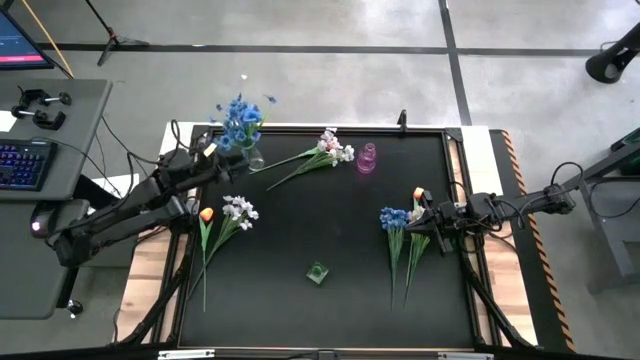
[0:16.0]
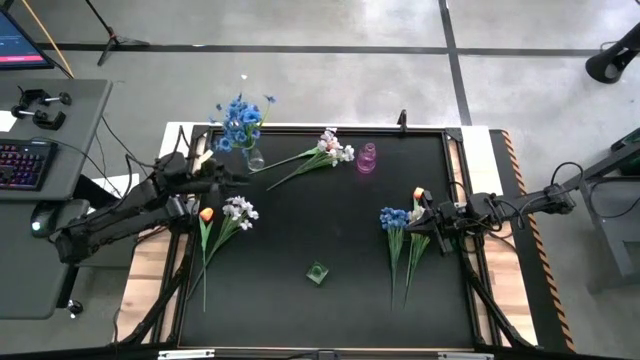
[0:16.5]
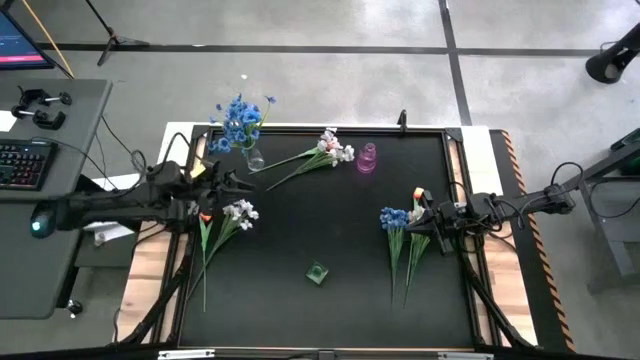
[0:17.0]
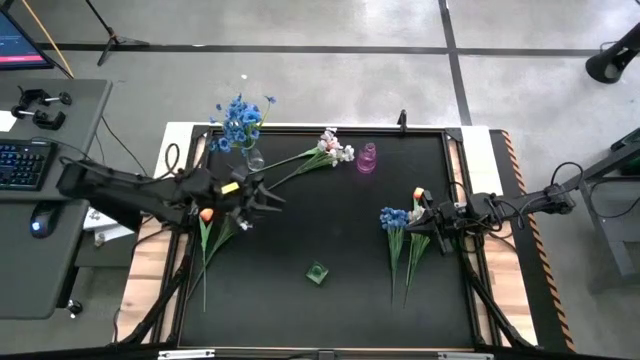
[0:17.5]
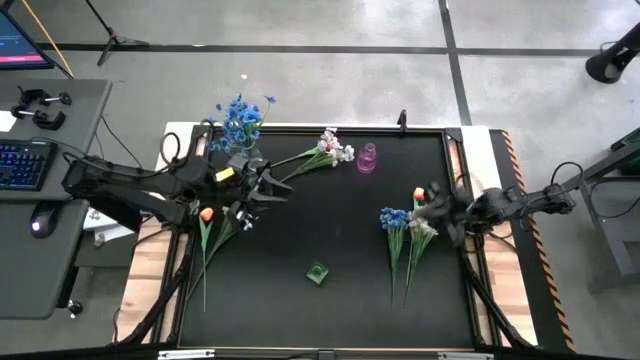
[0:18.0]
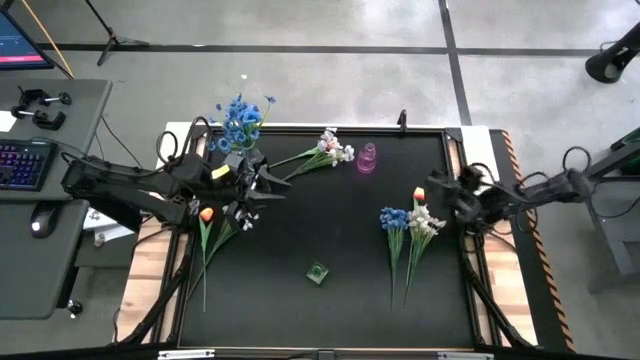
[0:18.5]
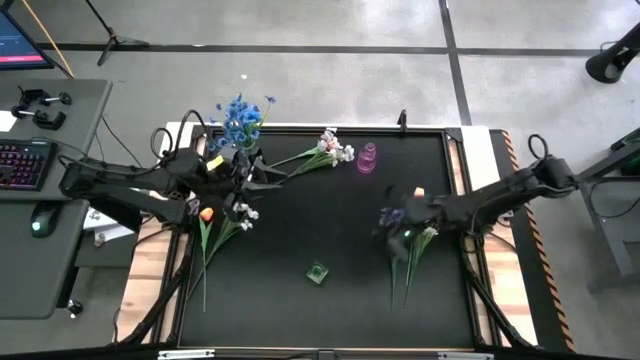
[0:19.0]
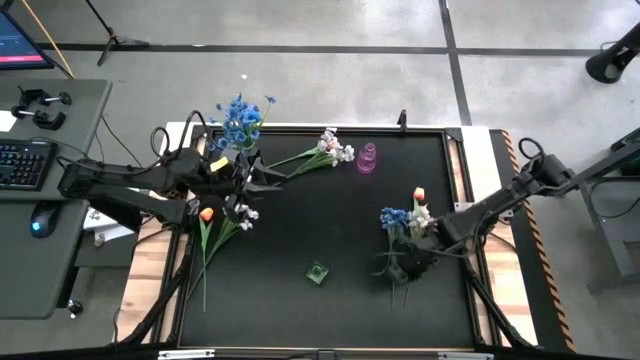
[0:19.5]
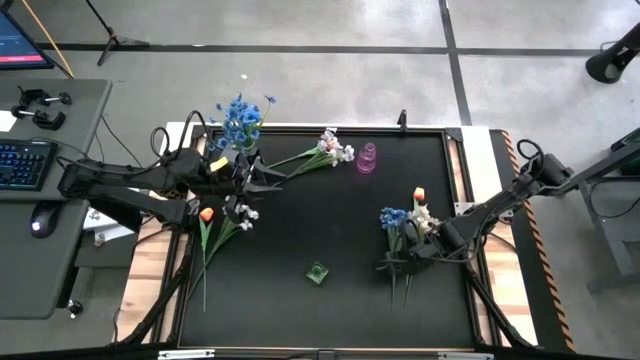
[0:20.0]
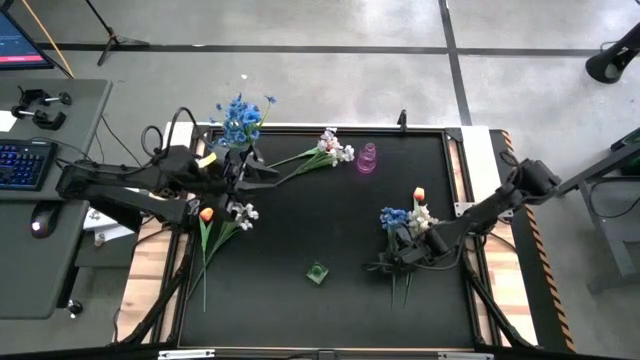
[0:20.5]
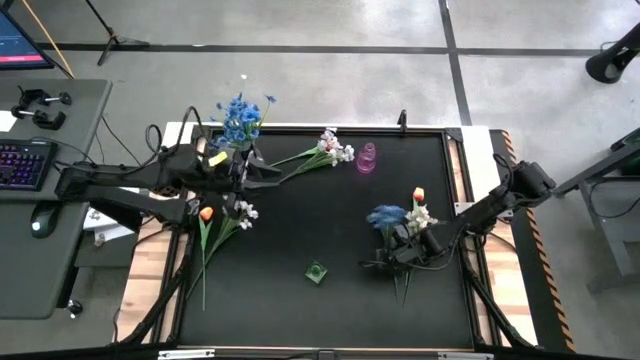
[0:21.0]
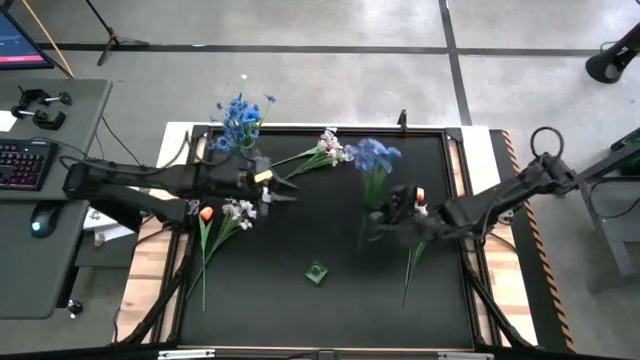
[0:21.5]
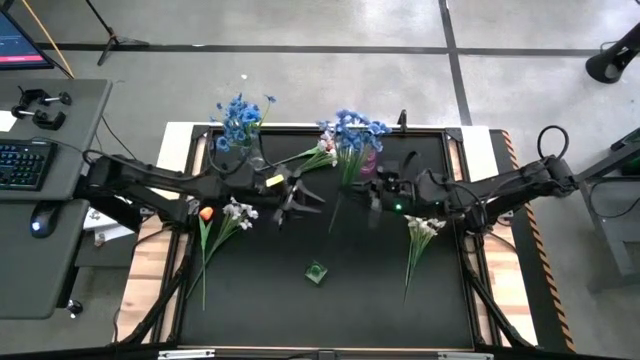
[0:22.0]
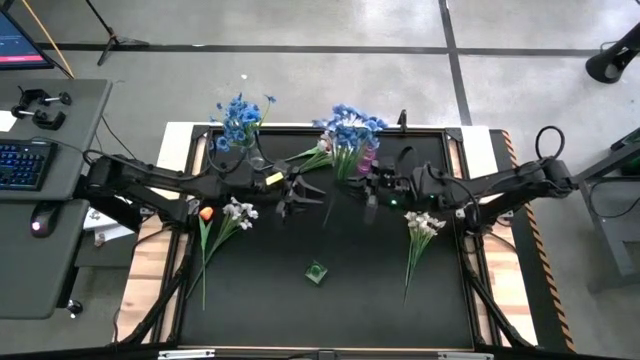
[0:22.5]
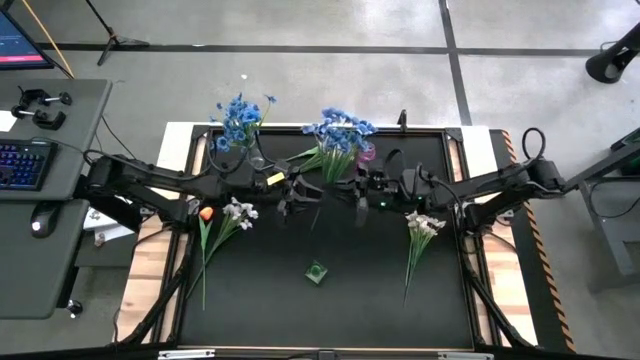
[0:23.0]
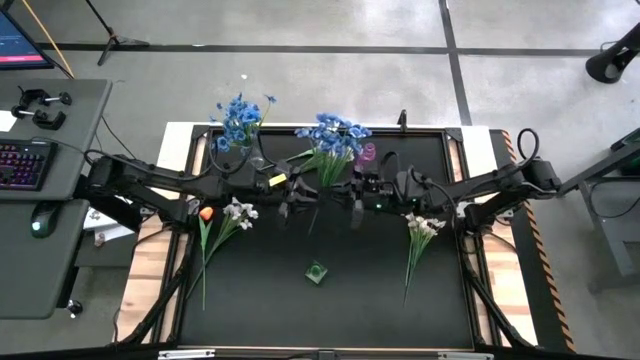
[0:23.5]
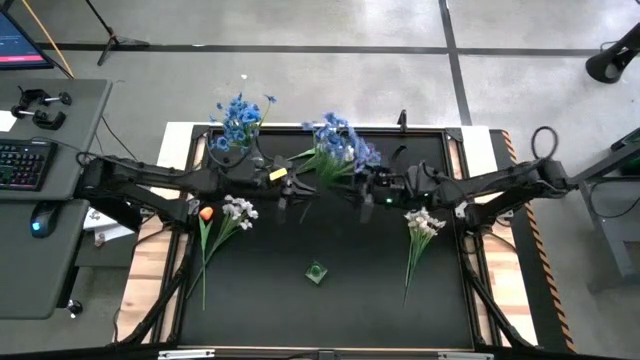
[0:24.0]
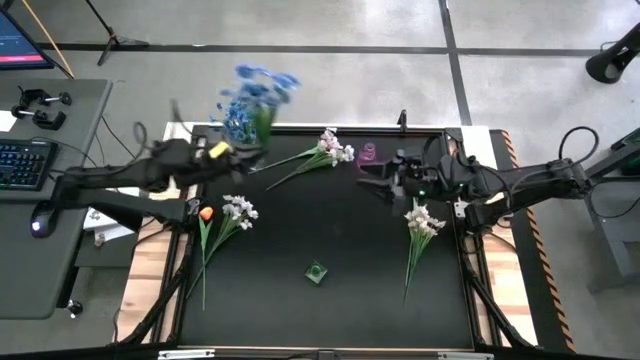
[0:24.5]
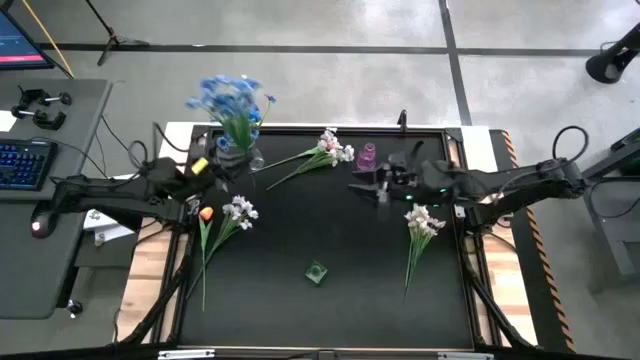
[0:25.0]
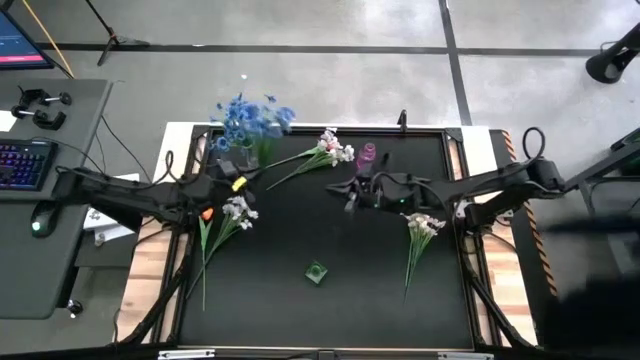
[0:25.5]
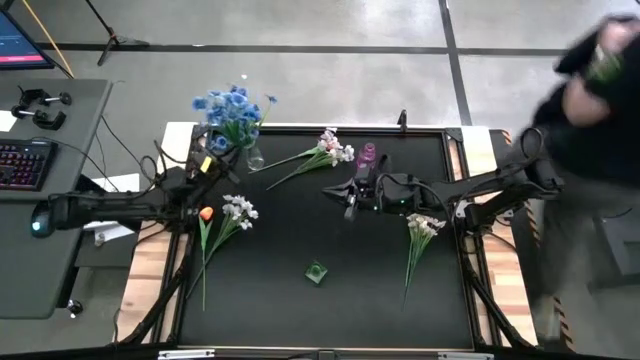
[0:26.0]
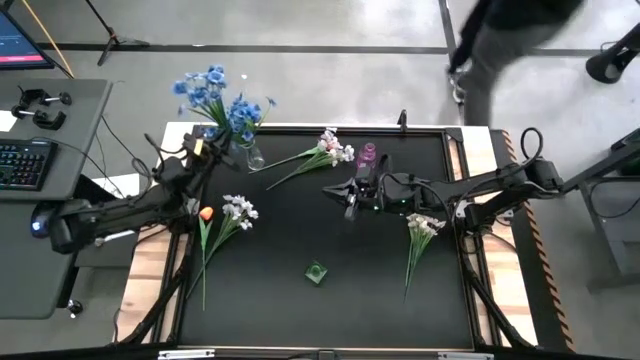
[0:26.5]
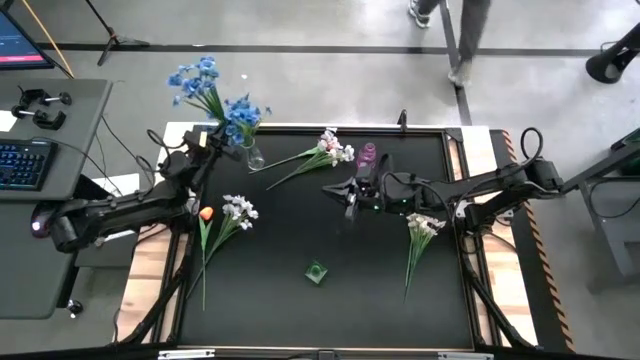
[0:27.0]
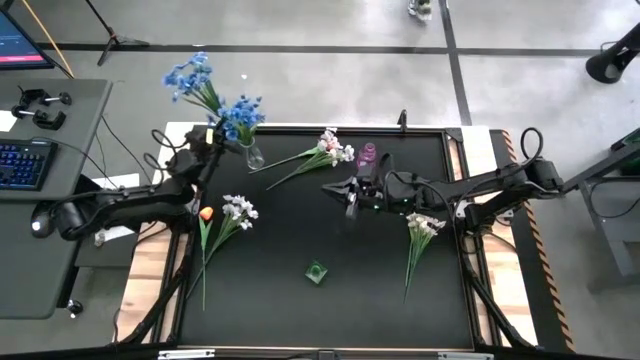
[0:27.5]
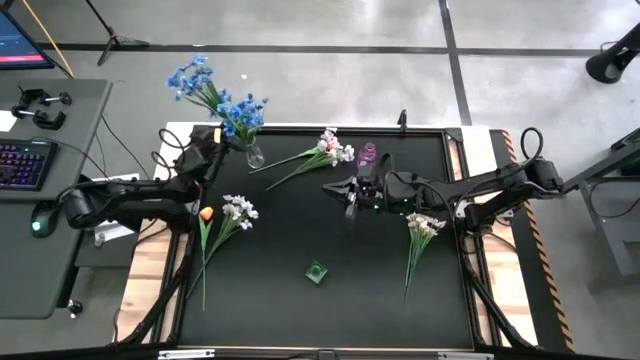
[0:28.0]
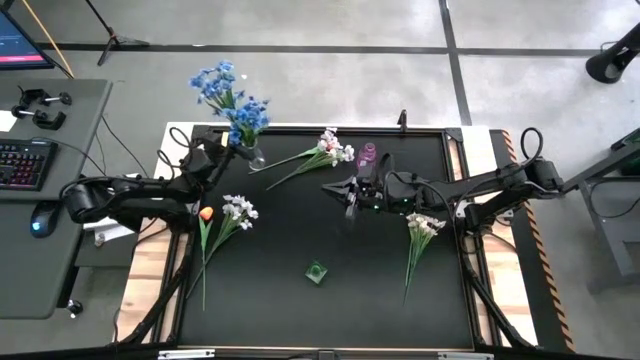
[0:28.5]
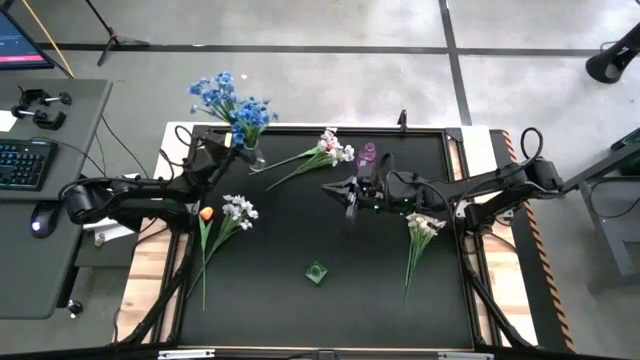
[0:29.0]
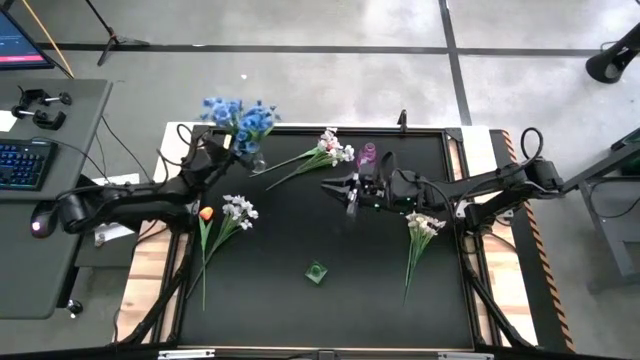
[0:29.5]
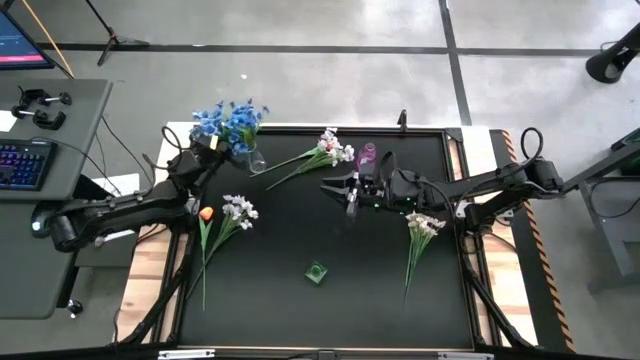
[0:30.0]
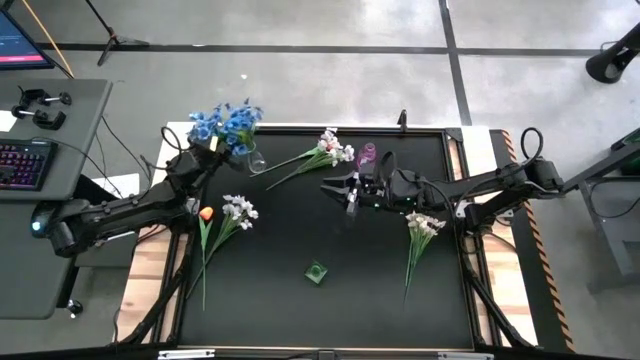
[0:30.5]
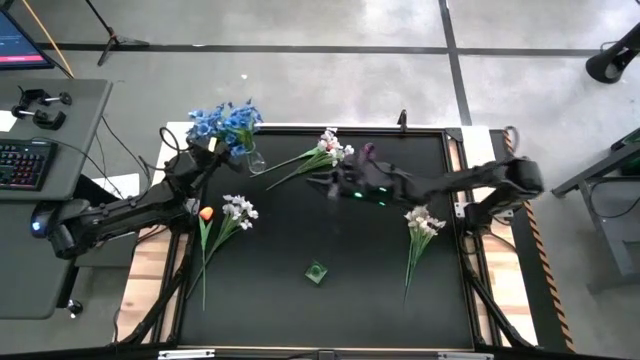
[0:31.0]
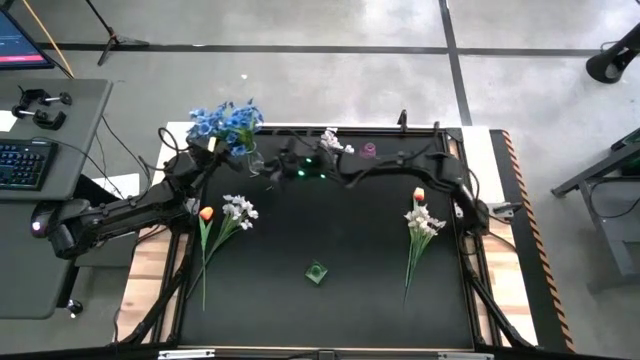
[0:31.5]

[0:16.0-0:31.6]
Task: Sort flowers into vase by color
Put the blue flowers into the transparent vase

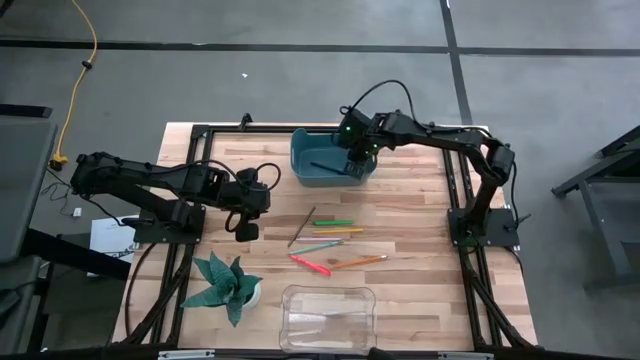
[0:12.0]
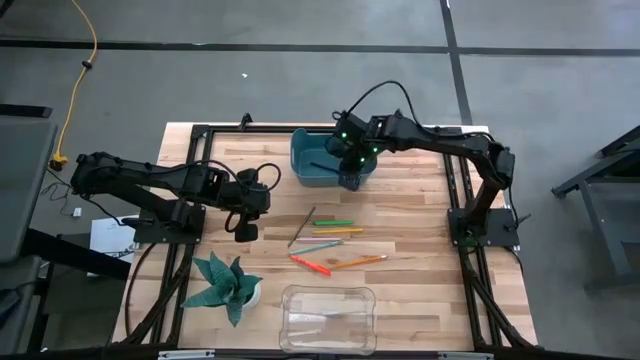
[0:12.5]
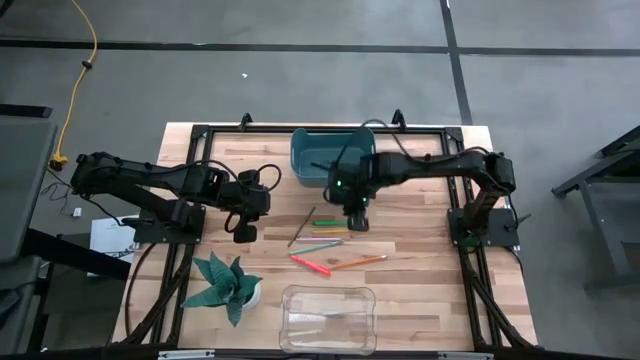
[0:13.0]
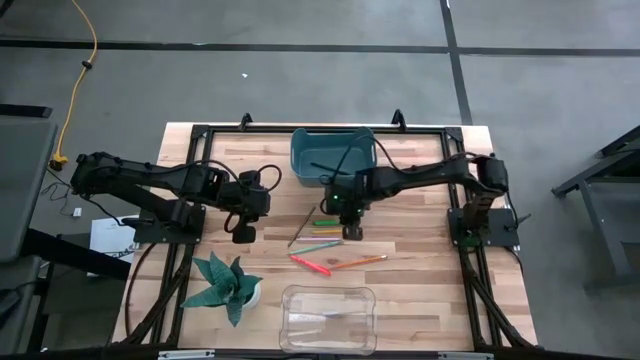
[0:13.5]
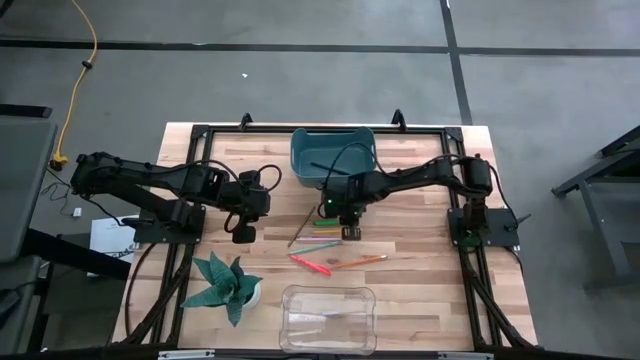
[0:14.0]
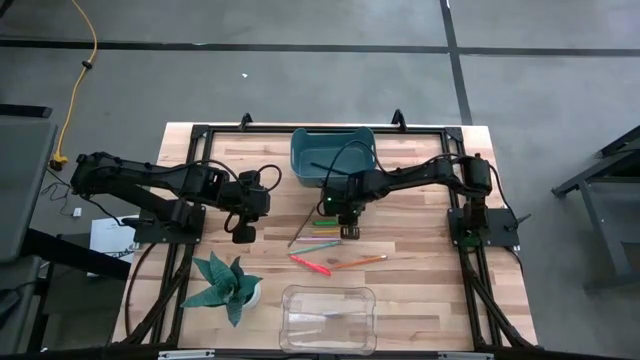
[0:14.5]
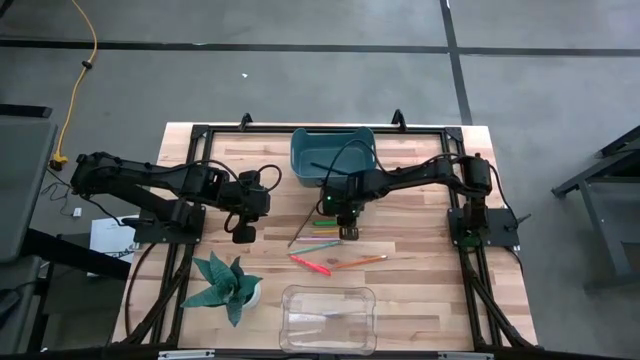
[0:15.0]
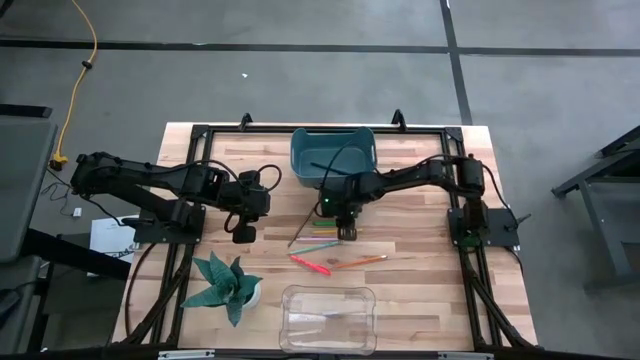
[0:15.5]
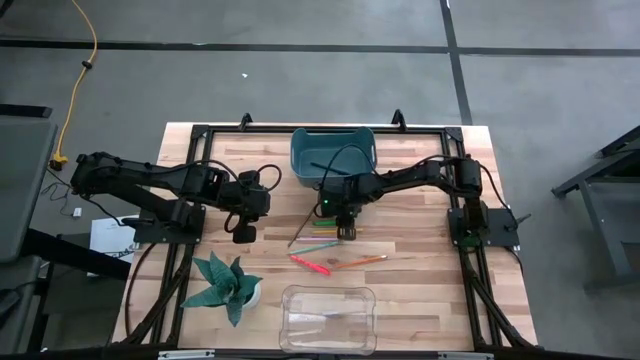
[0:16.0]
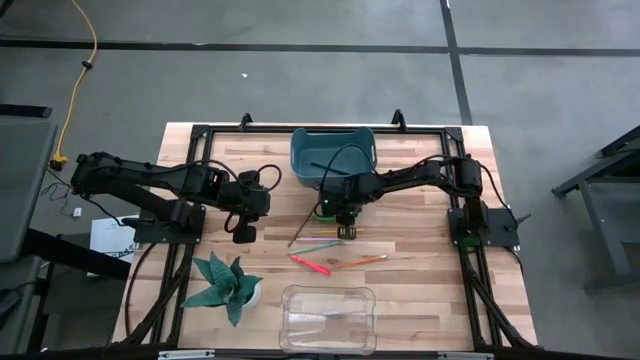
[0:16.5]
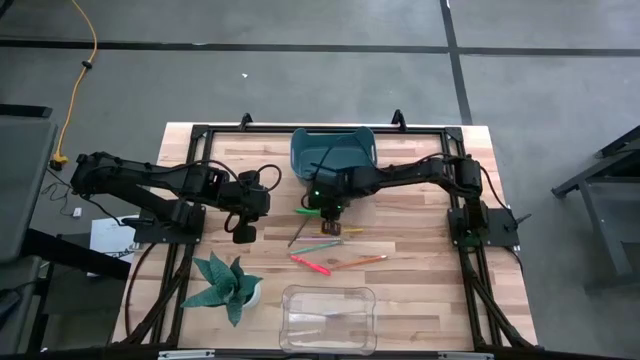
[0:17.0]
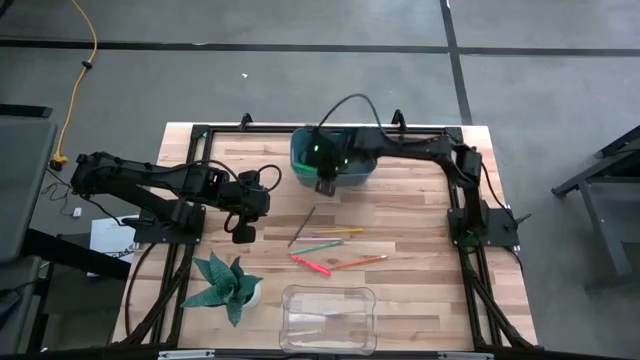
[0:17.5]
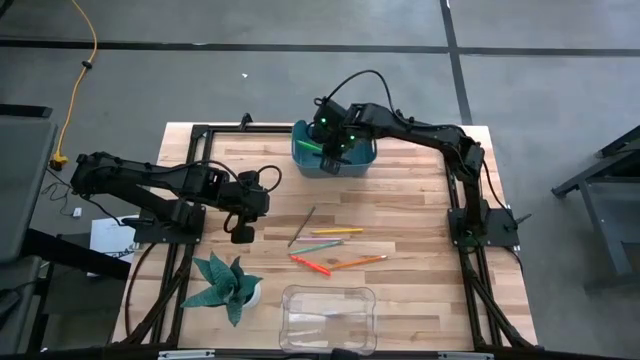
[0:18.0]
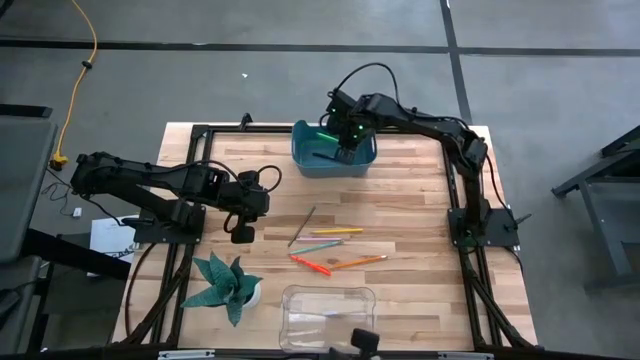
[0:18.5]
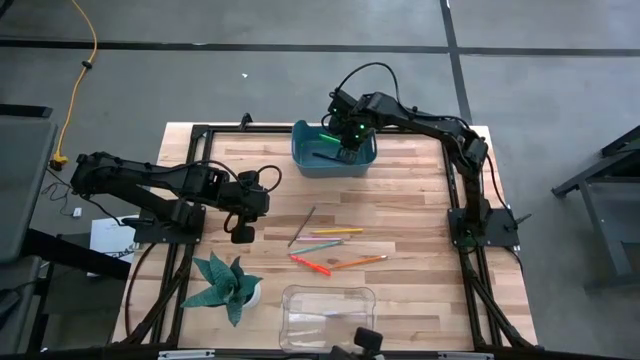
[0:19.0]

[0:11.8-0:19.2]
Task: Sort pens & pencils
Put the green pen into the dark blue bin
